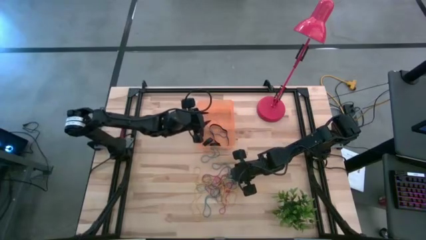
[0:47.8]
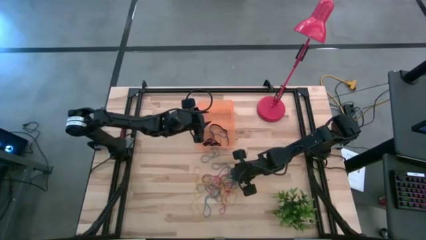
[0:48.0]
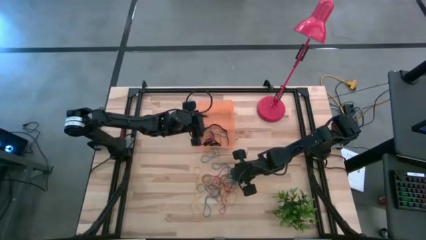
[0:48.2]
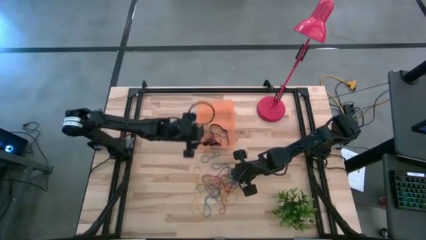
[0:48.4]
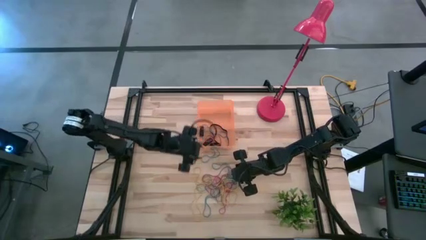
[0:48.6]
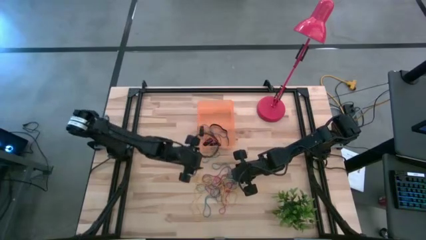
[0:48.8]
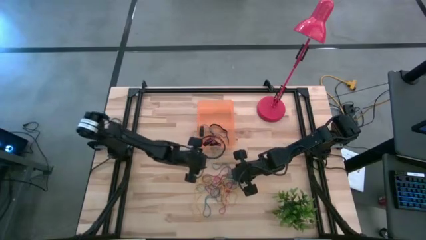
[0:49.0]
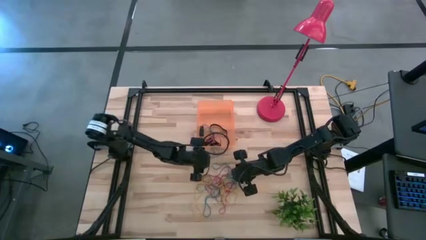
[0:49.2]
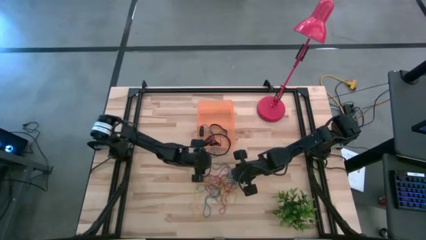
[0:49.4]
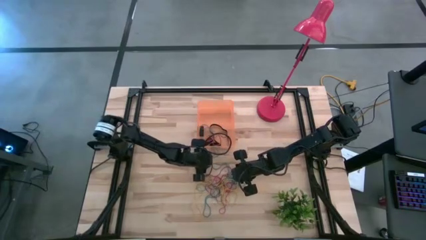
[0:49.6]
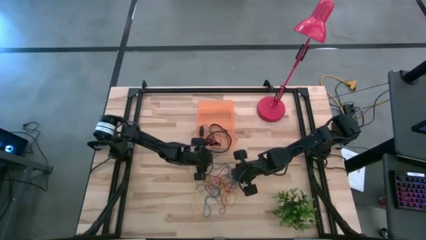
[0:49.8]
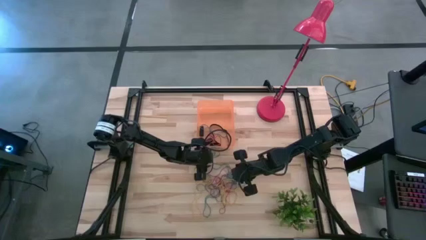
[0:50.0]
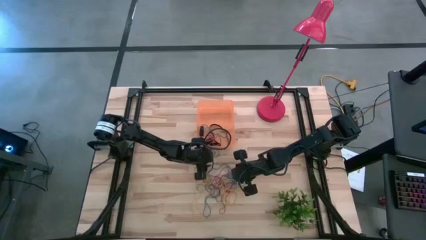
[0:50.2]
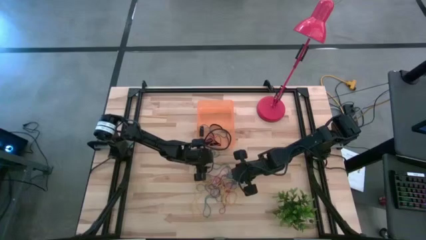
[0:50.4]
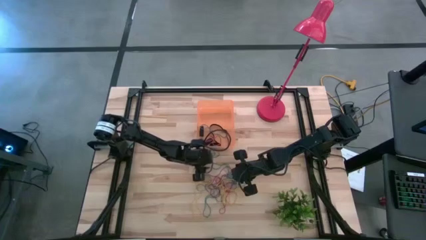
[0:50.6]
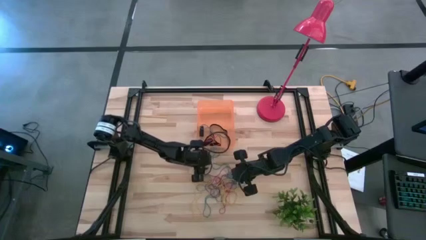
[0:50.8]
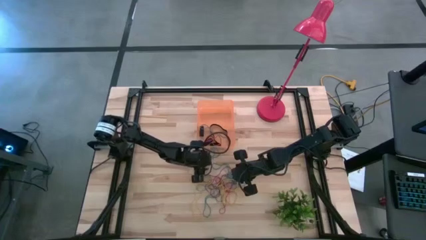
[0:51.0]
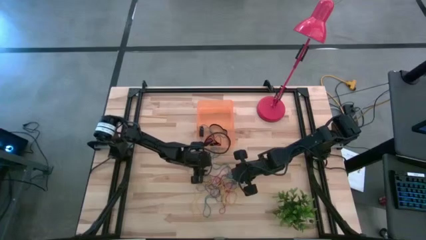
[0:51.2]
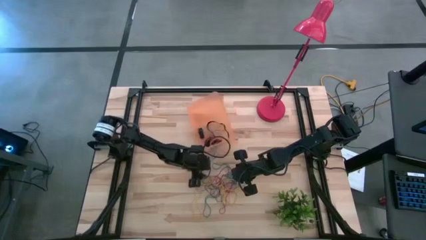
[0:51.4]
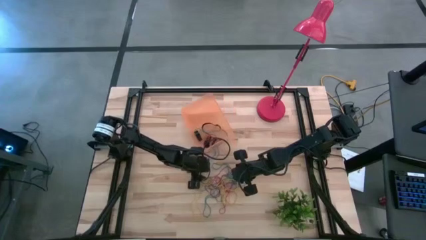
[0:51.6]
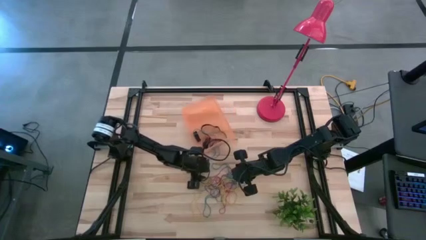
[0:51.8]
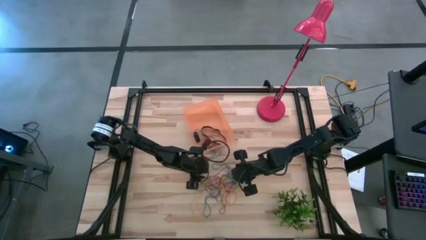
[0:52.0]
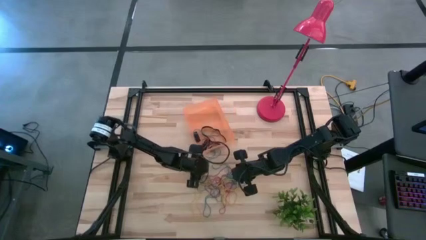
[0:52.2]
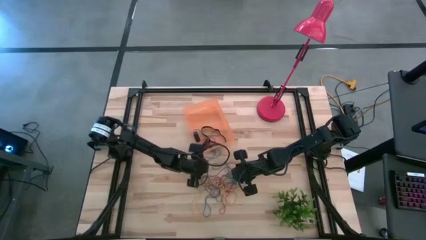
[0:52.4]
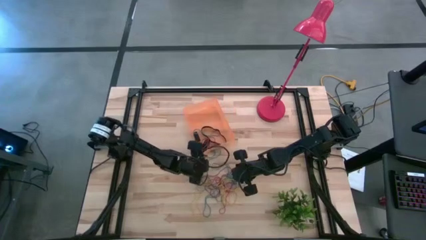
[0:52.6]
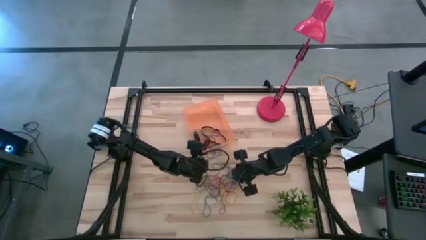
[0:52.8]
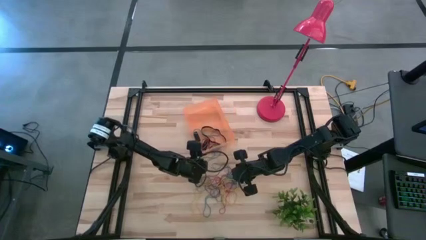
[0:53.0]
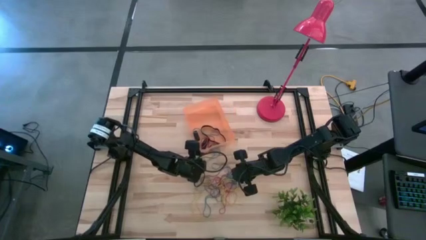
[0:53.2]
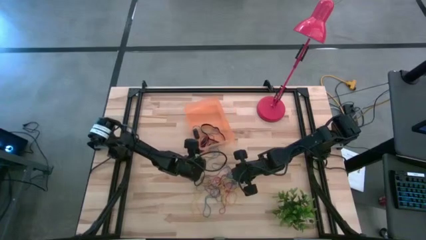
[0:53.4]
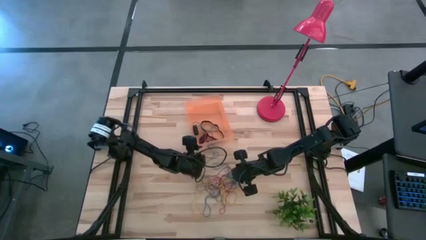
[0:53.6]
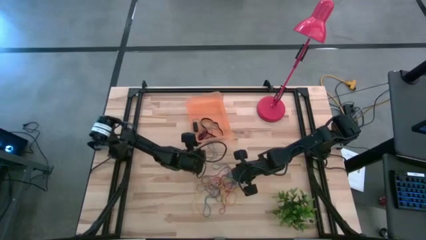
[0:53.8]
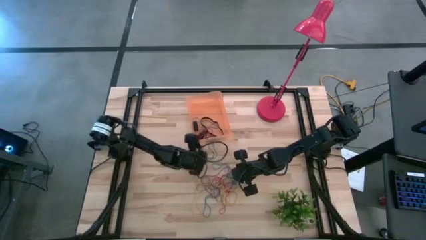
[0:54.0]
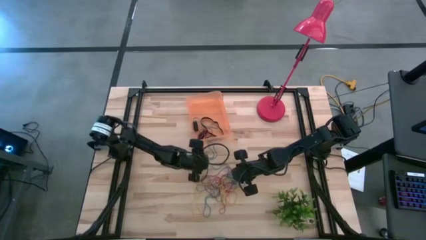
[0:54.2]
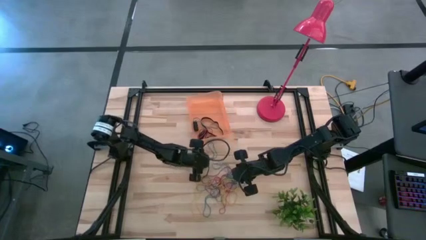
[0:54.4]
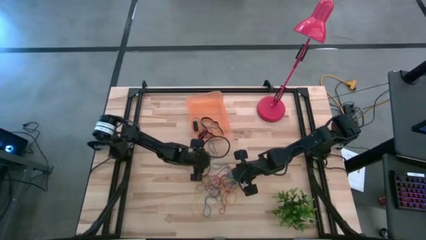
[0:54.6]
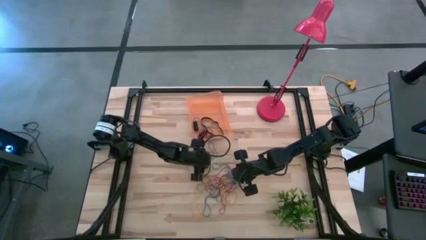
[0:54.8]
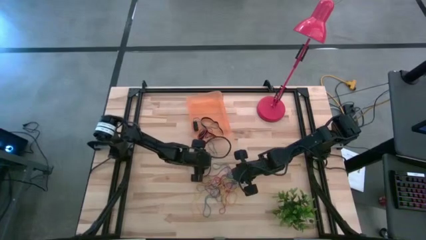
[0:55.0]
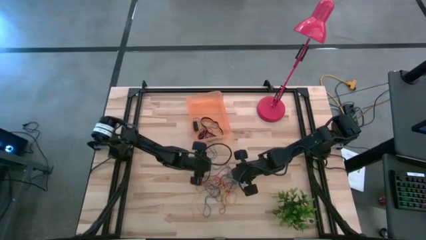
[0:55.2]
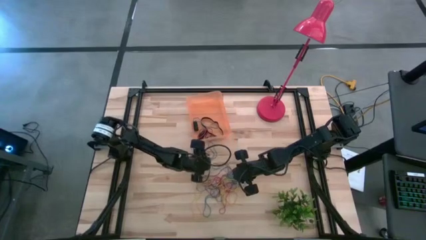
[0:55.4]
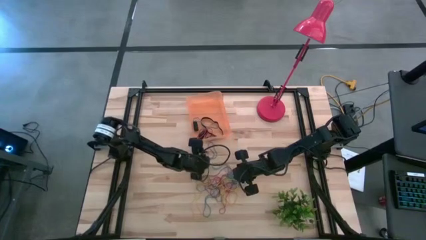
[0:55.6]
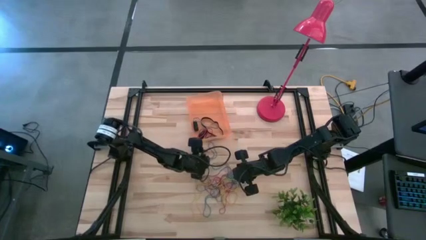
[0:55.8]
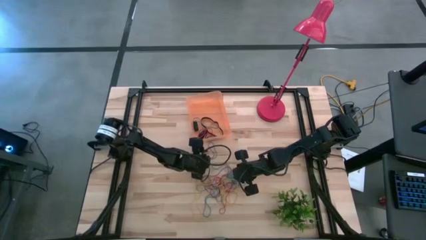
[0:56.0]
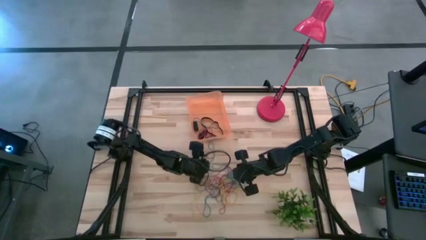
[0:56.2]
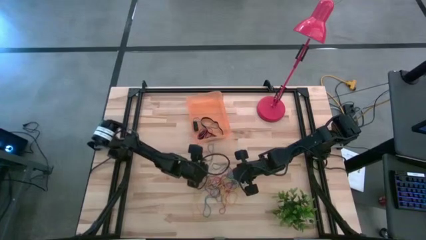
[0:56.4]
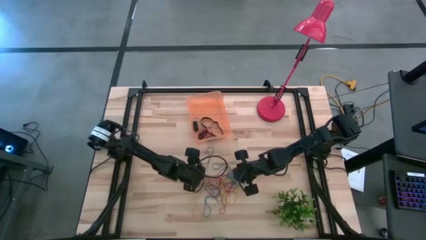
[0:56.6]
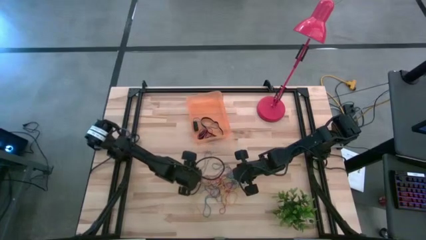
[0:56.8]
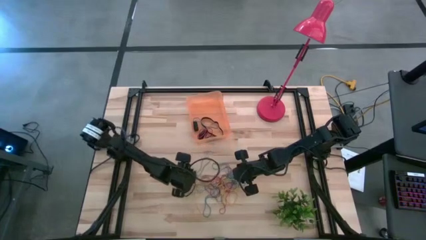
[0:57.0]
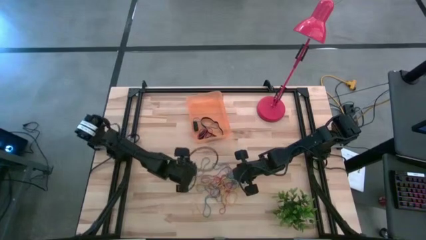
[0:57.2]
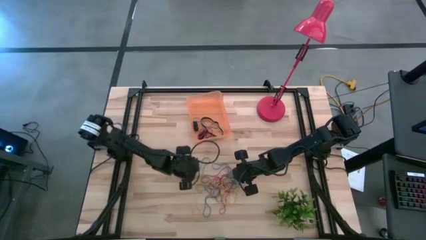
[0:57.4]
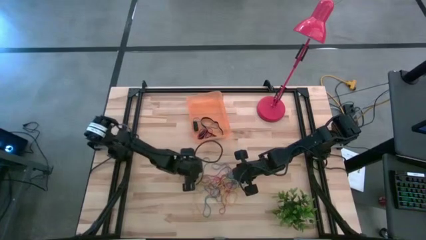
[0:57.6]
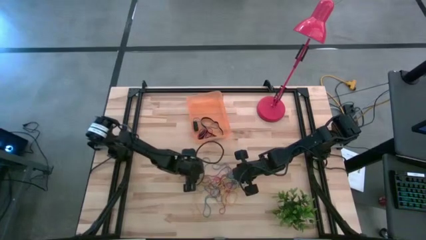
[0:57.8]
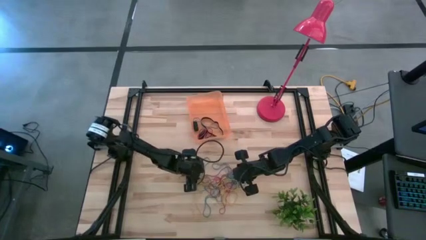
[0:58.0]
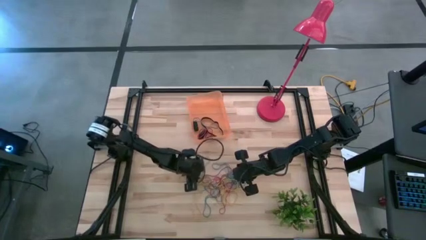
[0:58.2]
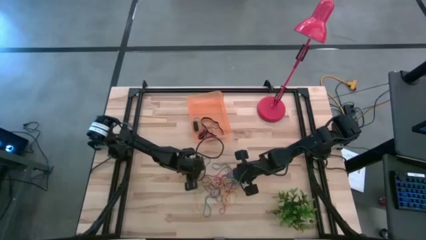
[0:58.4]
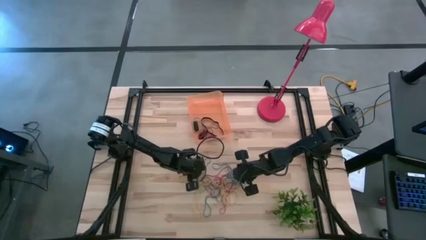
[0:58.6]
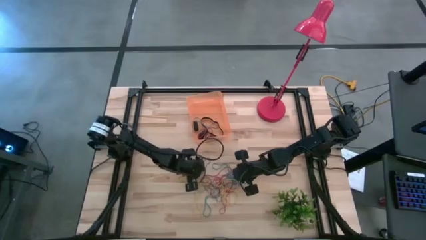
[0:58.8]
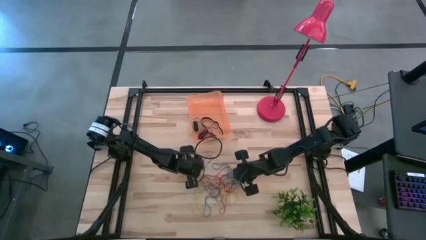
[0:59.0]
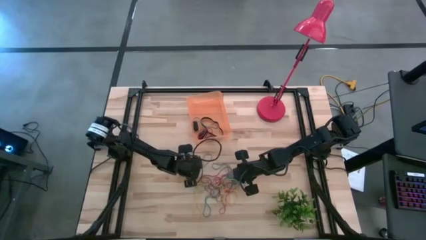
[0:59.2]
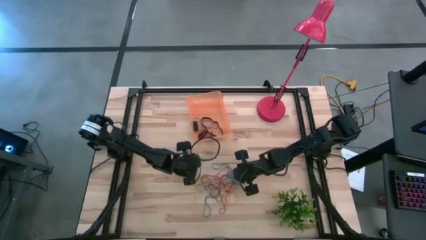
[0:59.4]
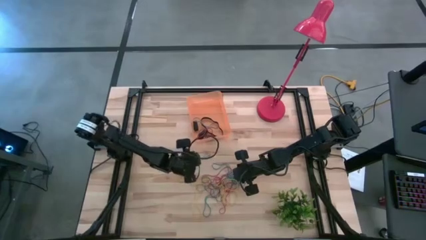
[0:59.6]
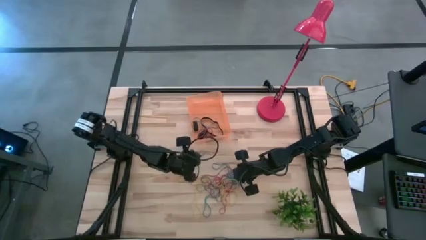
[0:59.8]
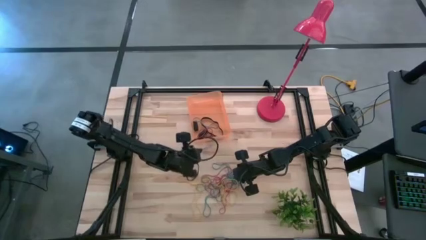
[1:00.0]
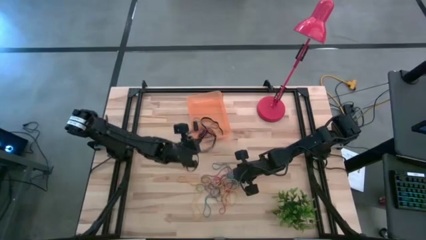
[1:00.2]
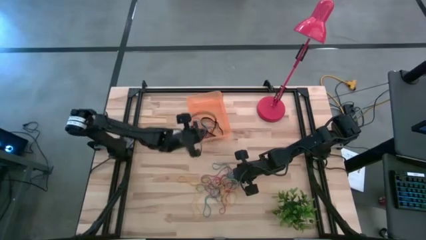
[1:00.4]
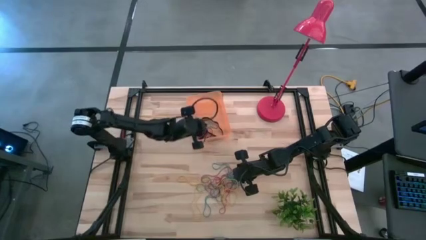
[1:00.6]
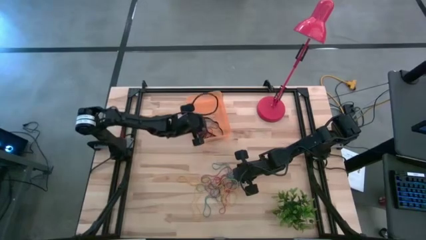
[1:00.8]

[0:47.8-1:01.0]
Task: Pick and place rubber bands into bin
Put the blue rubber band into the orange bin

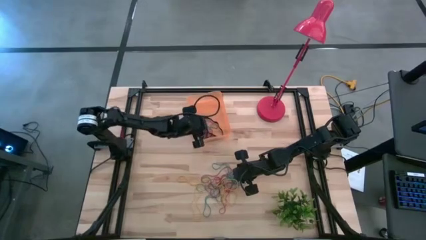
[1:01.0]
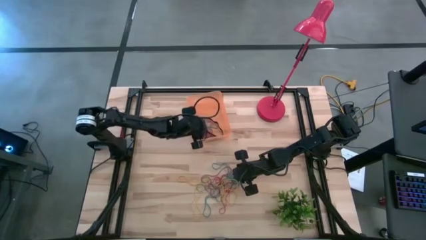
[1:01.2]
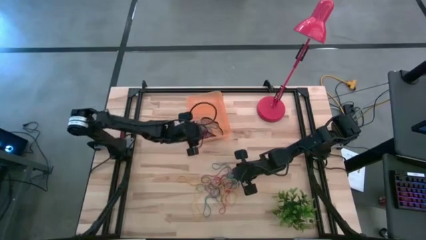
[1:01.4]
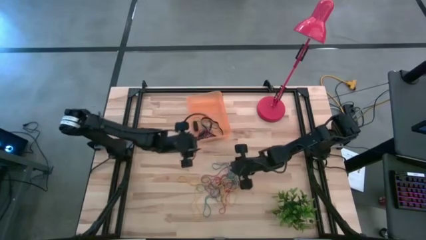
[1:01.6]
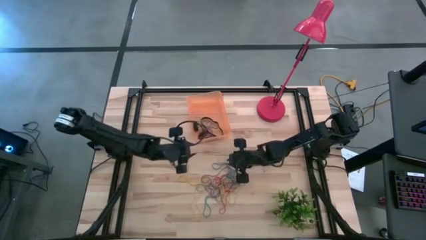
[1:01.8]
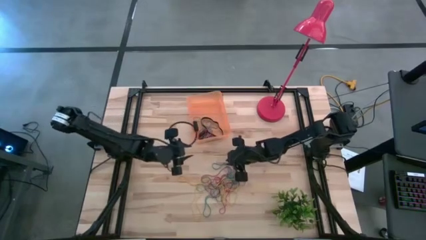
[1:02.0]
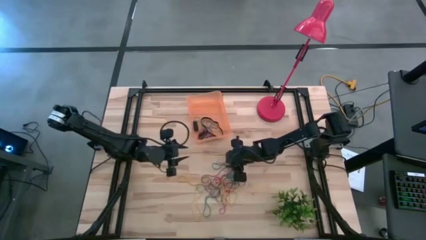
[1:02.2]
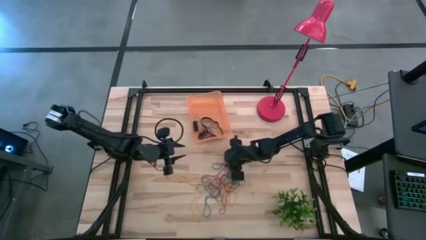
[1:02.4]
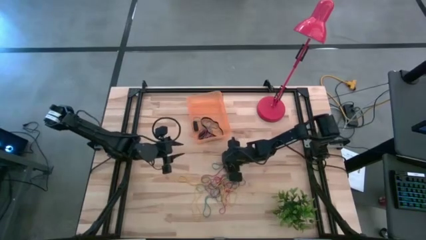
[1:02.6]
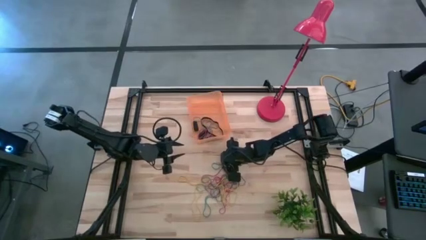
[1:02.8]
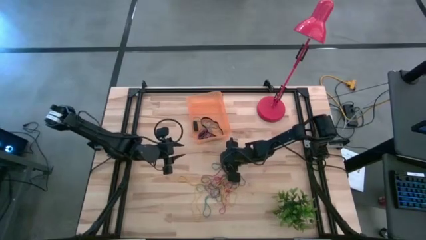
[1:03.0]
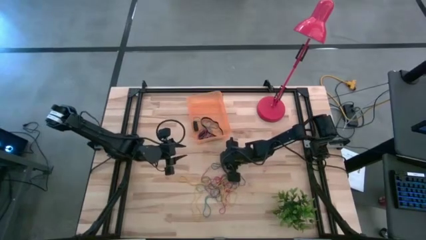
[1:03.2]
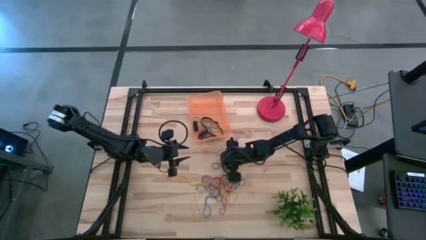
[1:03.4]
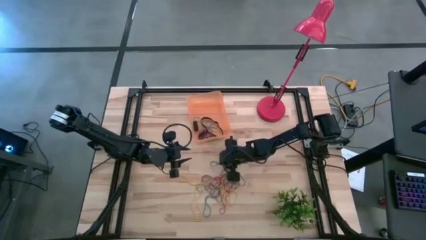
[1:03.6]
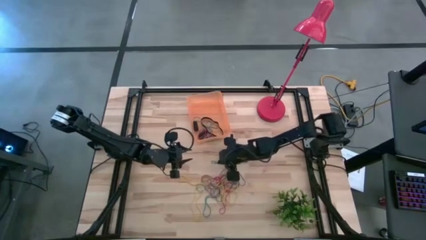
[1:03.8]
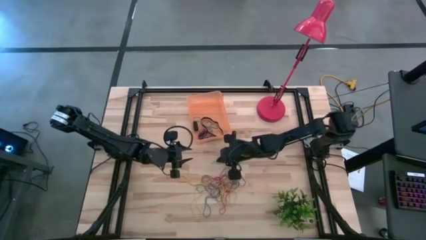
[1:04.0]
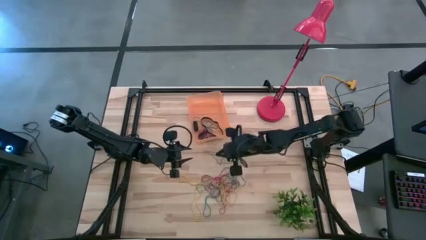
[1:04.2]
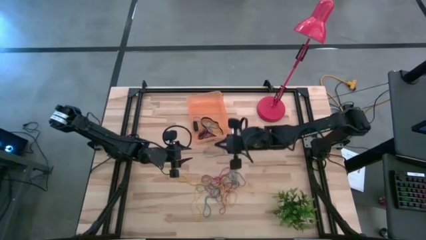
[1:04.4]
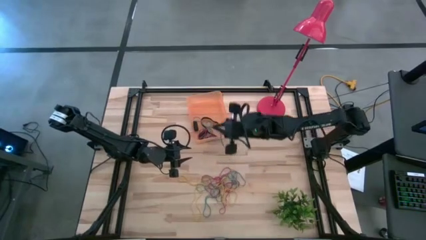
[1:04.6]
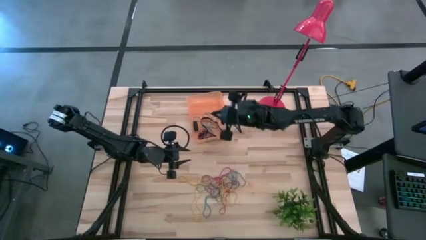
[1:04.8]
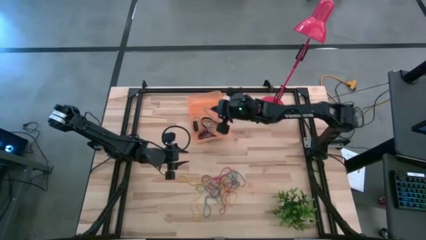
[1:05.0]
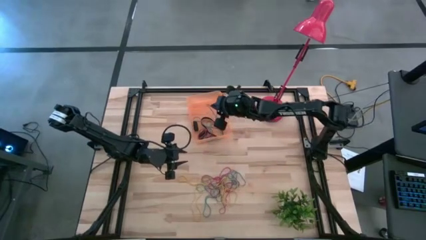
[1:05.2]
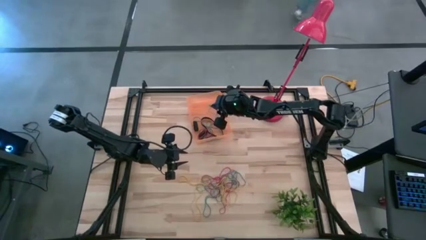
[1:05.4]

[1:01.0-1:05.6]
Put the blue rubber band into the orange bin
